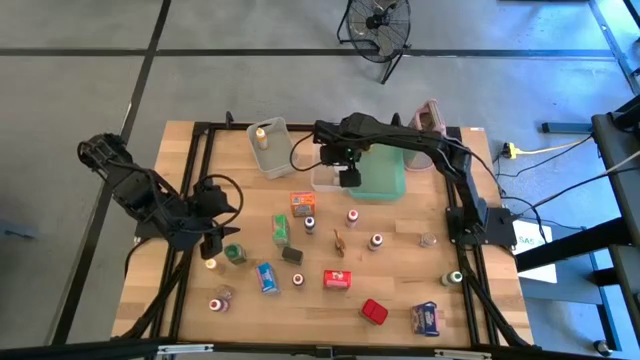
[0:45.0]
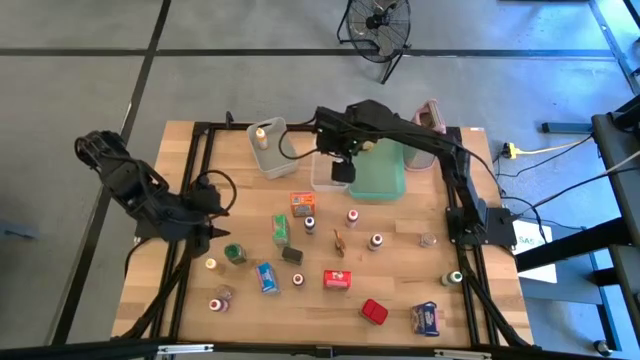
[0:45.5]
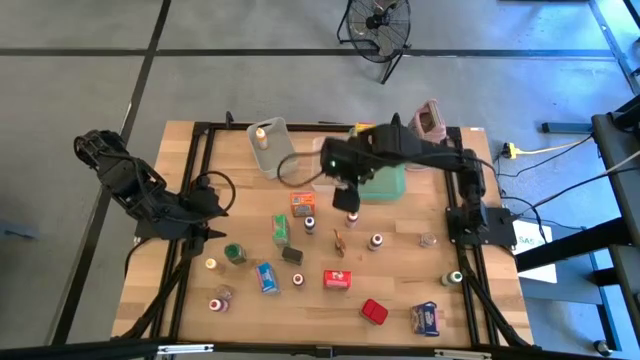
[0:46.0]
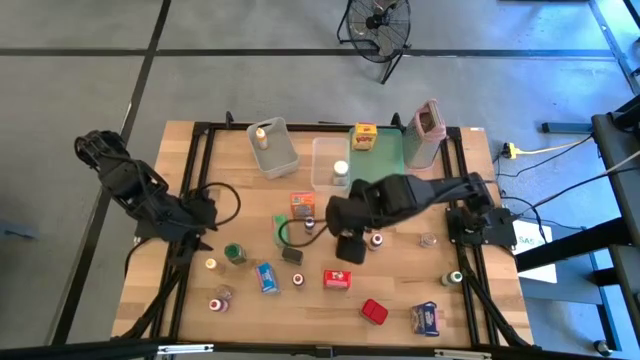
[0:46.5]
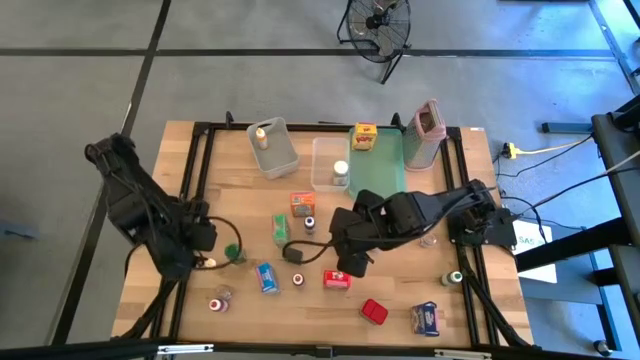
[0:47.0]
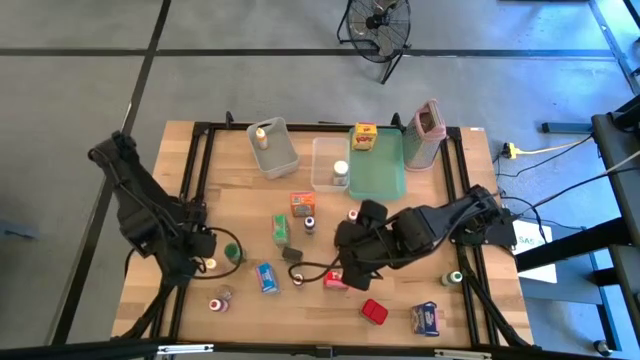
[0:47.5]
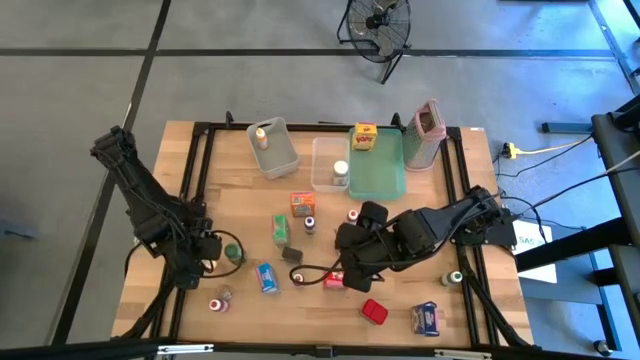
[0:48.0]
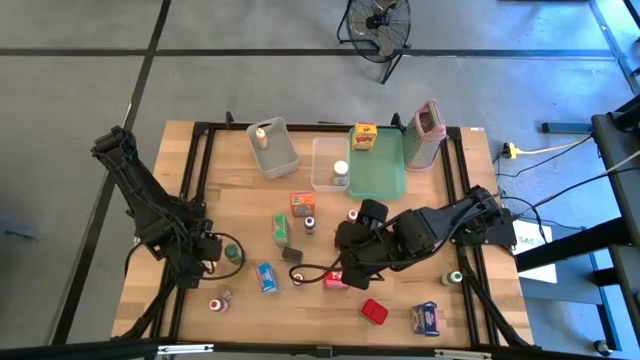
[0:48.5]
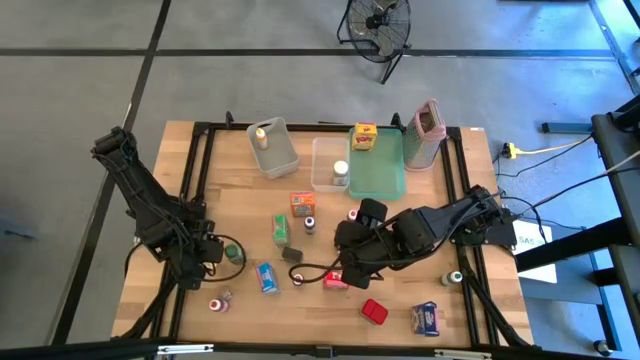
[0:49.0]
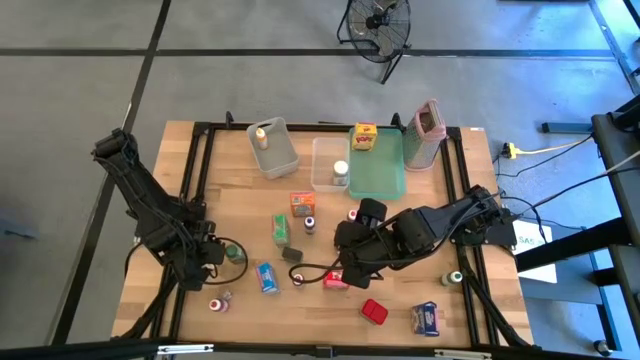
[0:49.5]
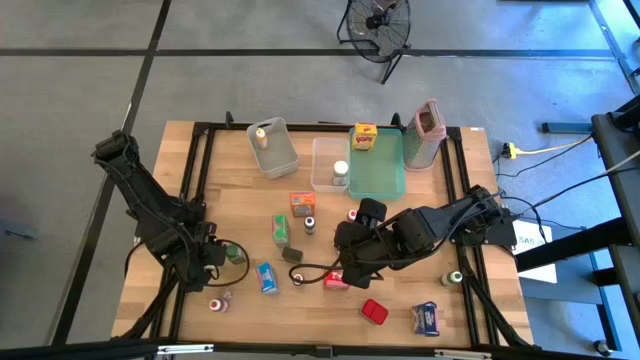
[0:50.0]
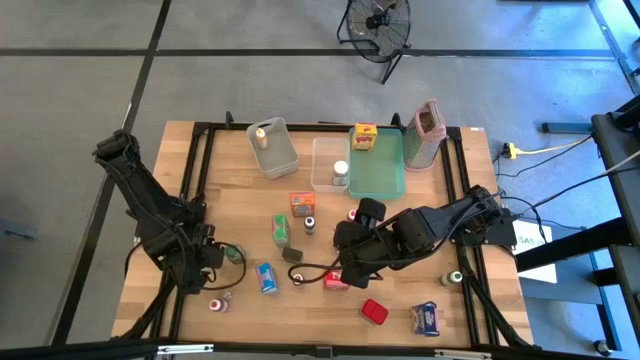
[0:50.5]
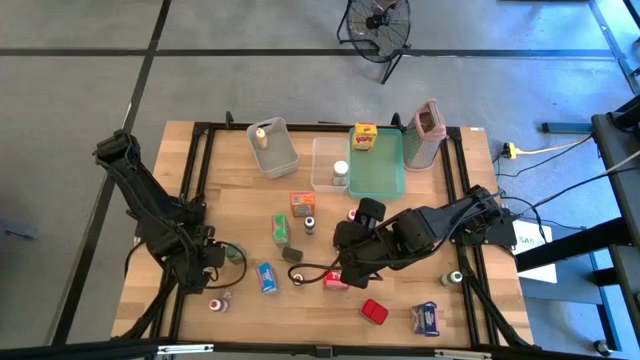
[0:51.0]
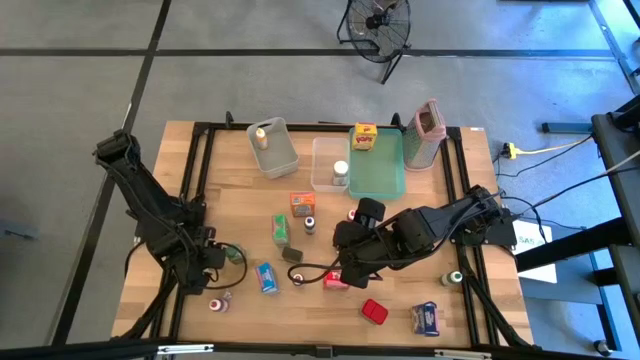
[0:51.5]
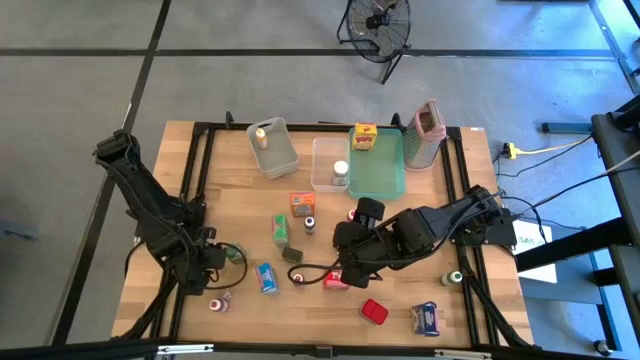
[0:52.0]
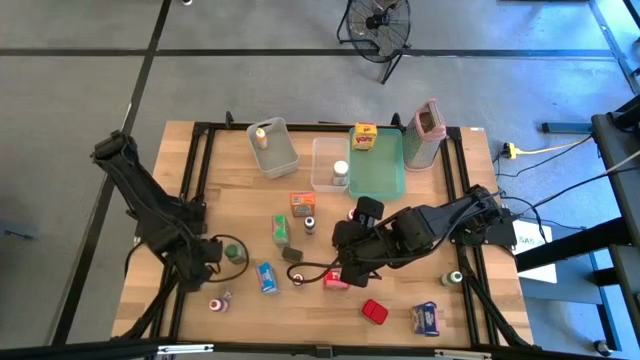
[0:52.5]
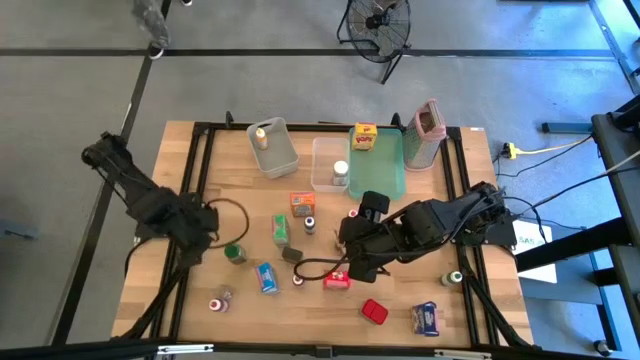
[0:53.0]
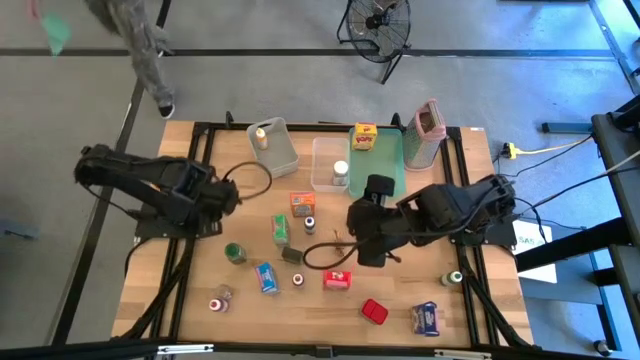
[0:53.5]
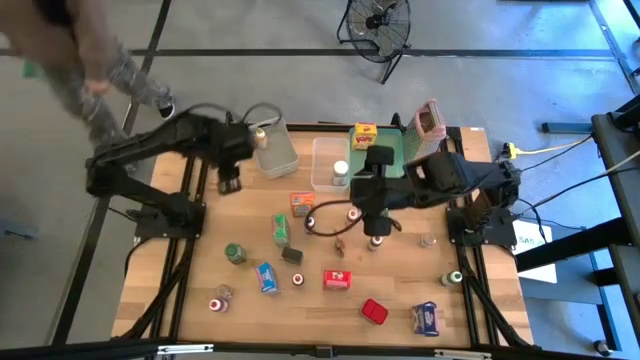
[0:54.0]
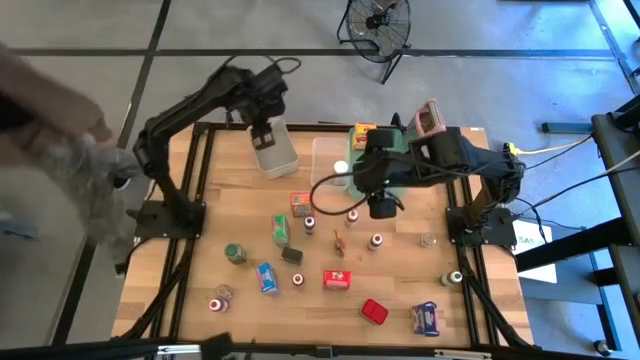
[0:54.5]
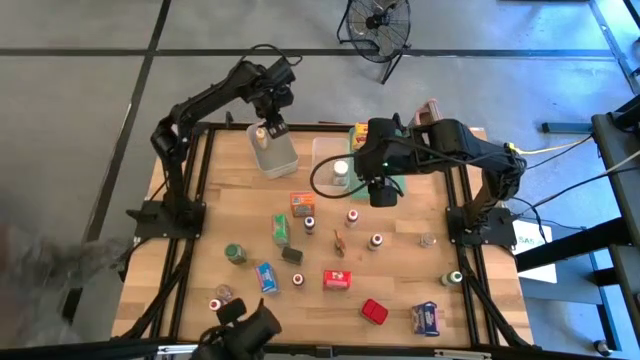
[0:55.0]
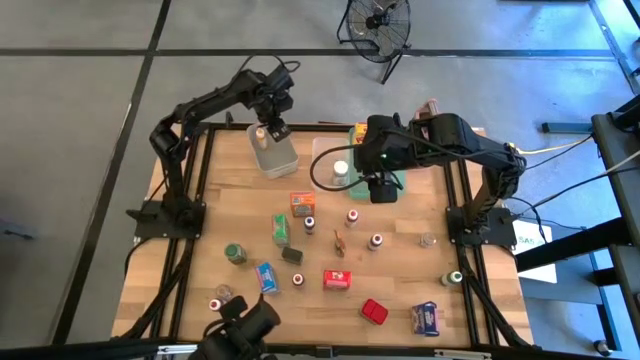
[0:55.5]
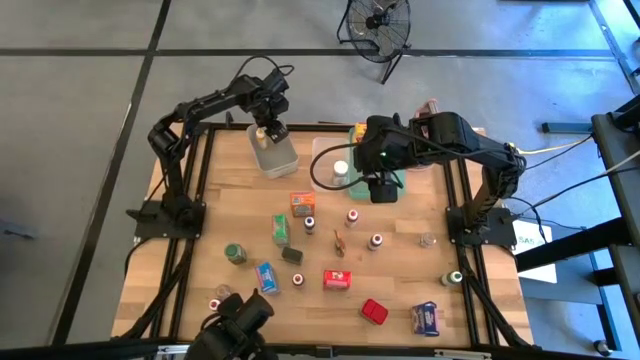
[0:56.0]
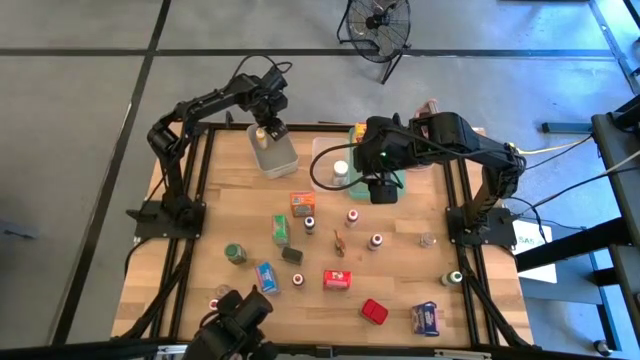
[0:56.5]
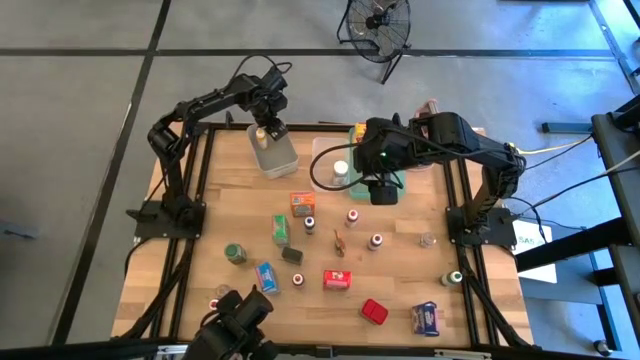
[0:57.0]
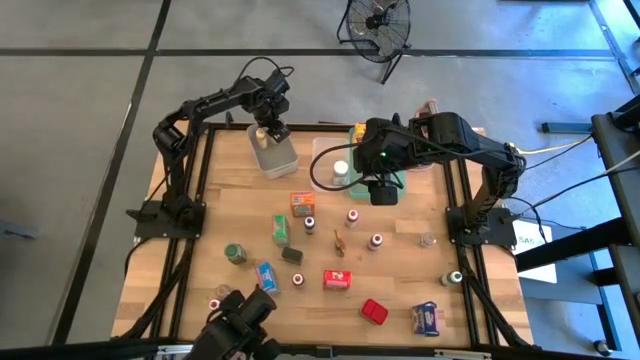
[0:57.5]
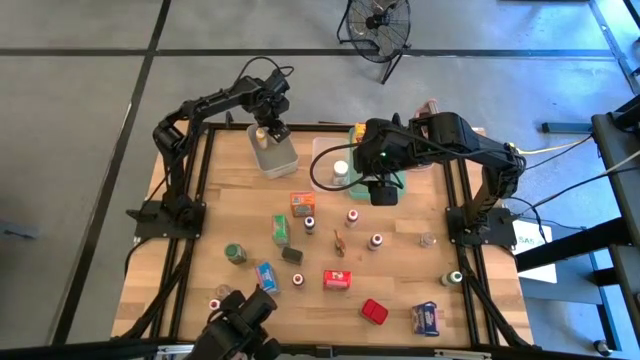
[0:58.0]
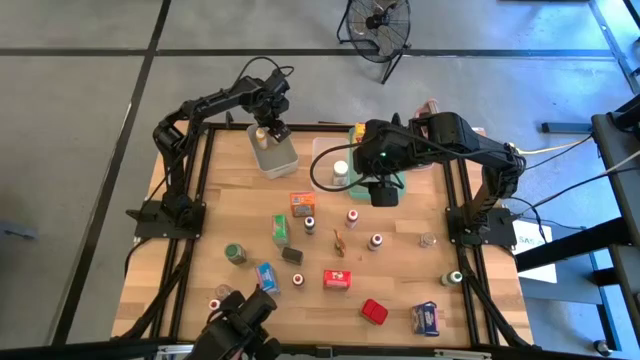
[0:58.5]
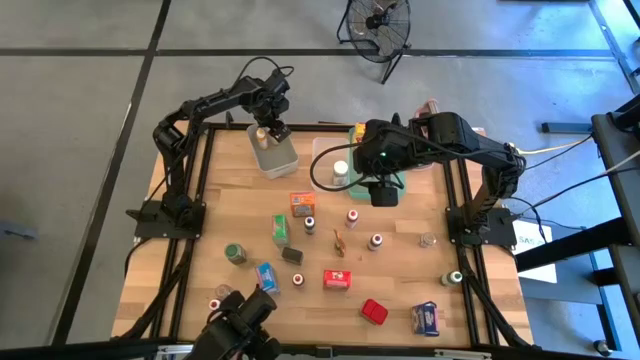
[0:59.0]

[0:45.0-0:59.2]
Task: Pick & Place Kitchen Items
Put the yellow food coloring bottle into the gray bin

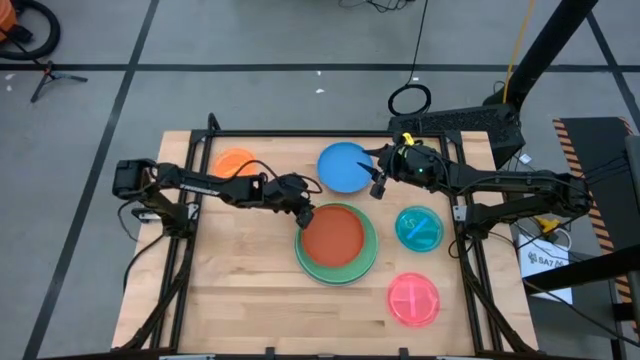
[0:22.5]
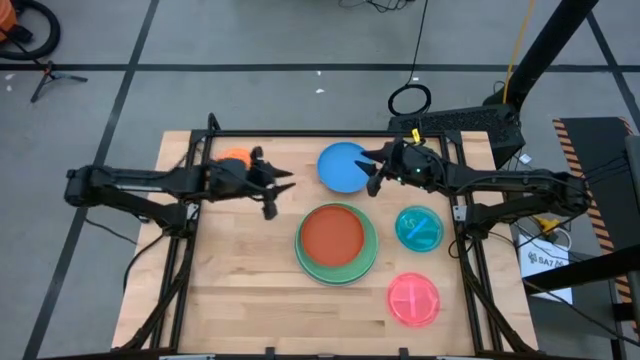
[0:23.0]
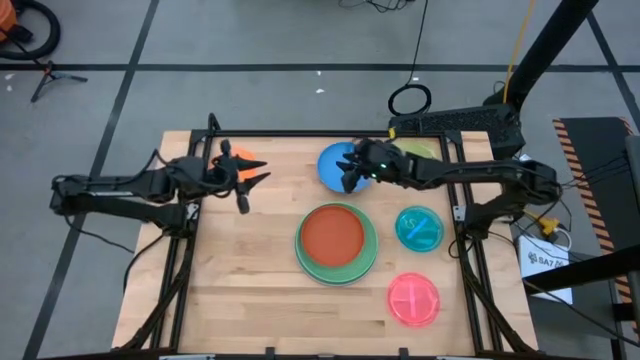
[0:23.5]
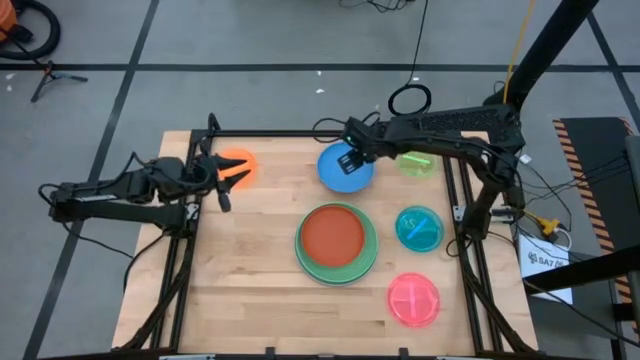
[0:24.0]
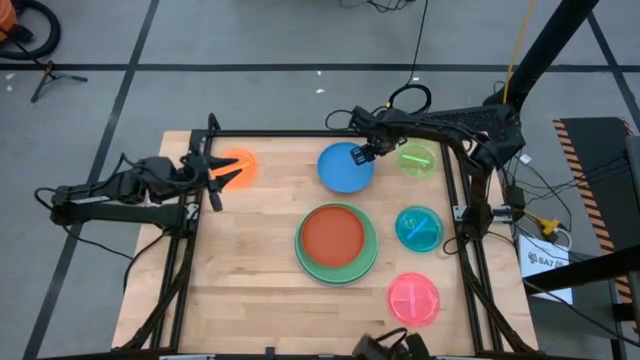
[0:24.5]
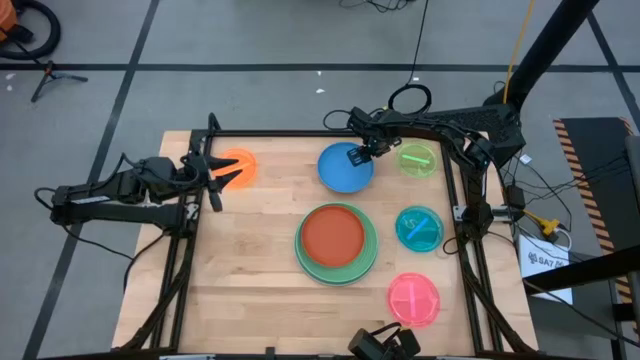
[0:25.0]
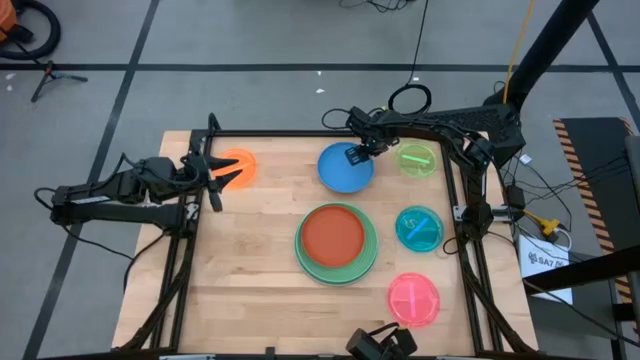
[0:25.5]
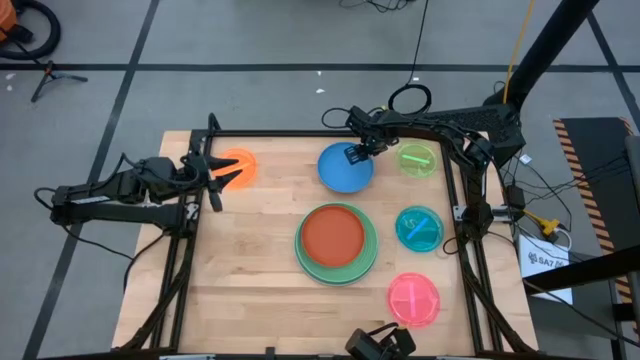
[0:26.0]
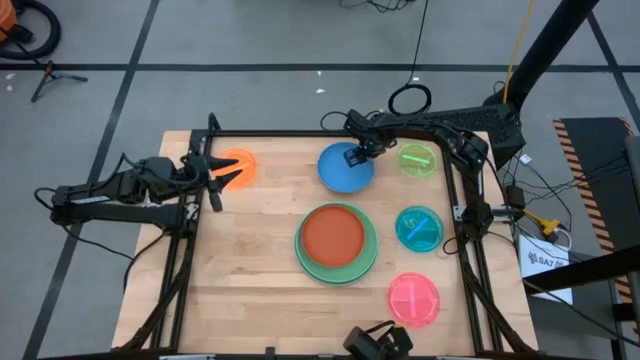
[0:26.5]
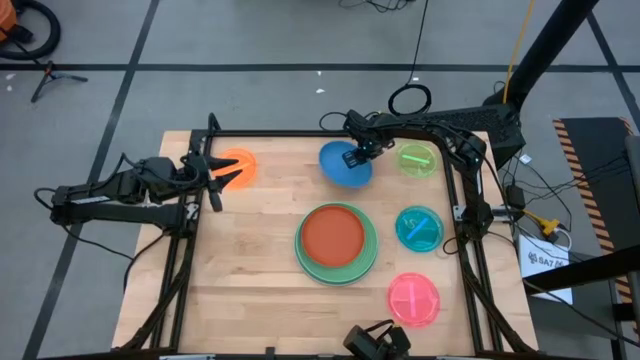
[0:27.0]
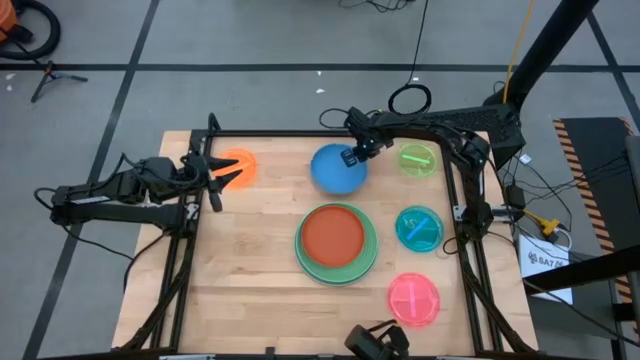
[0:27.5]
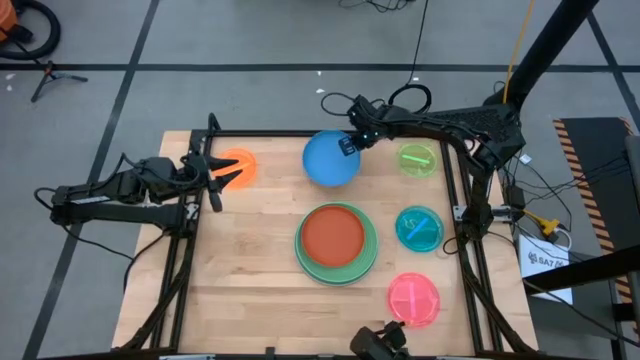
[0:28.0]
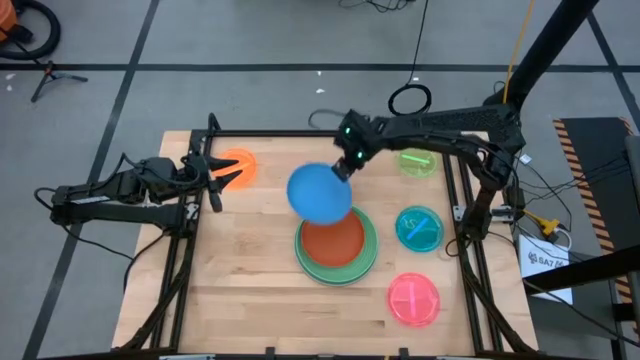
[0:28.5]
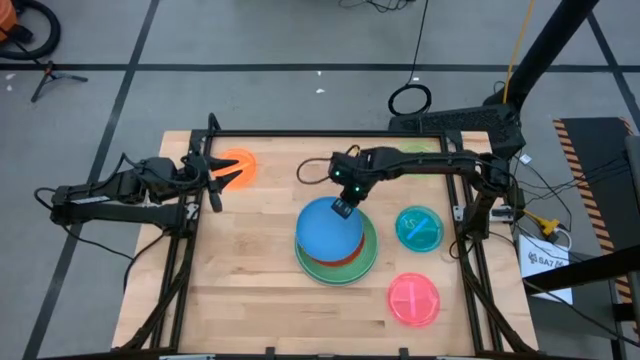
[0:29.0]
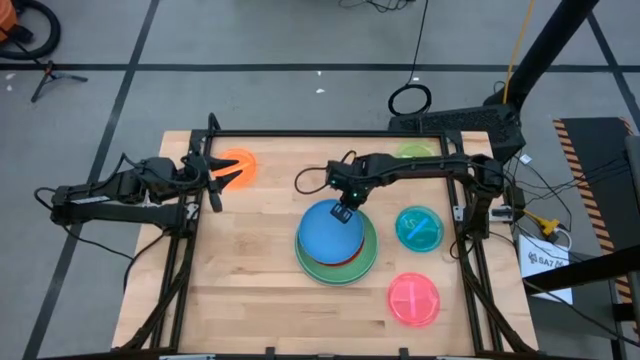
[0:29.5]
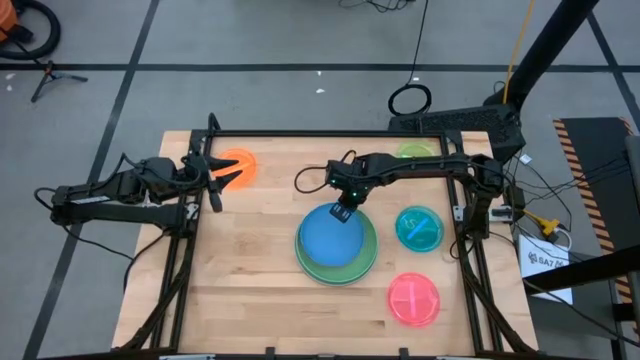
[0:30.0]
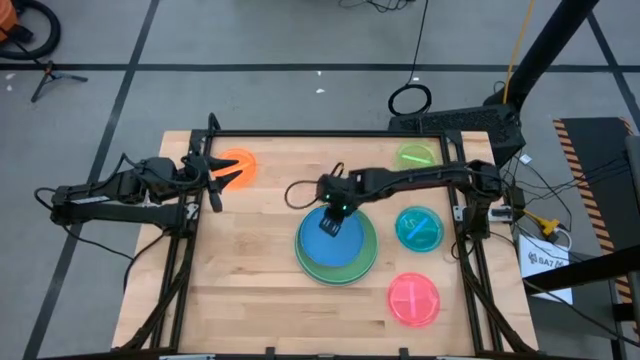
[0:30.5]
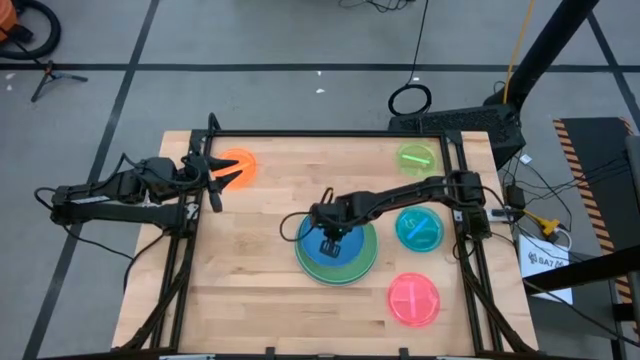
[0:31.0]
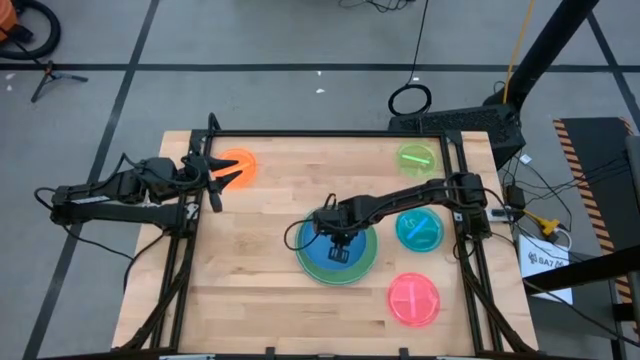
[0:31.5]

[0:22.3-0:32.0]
Task: Stack plastic plates
Stack the dark blue plate on top of the dark orange plate
